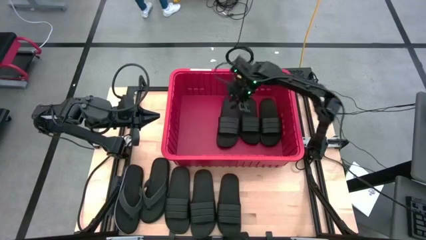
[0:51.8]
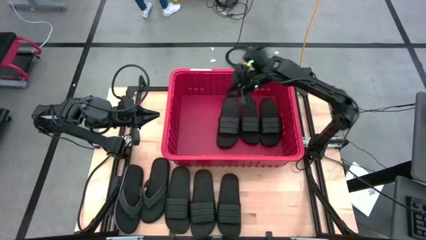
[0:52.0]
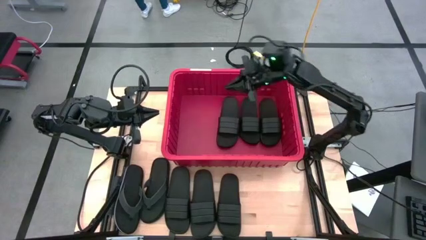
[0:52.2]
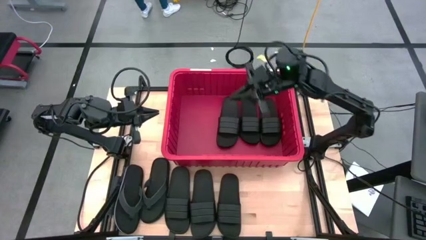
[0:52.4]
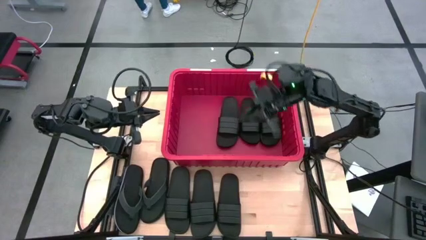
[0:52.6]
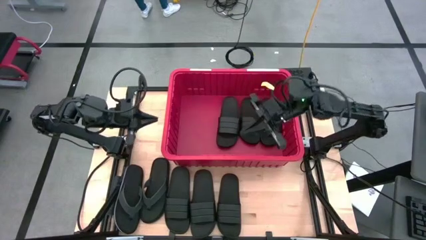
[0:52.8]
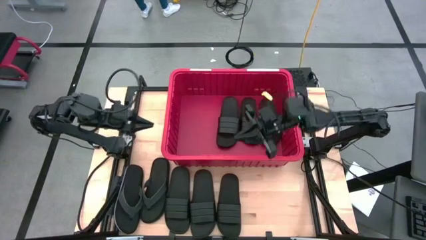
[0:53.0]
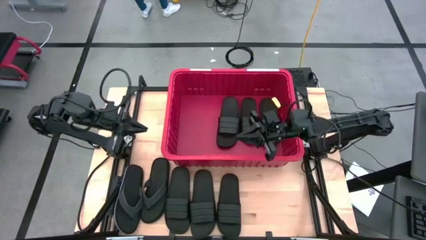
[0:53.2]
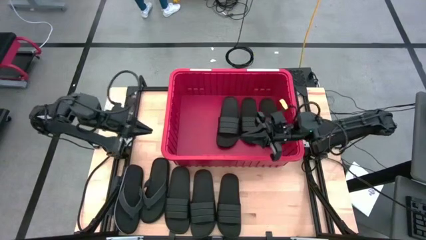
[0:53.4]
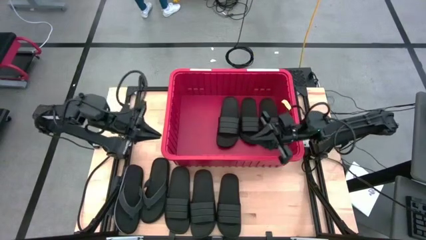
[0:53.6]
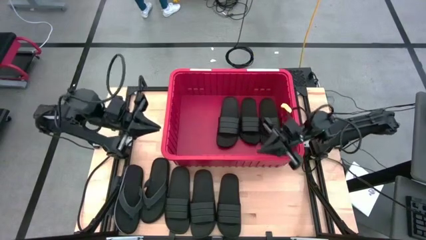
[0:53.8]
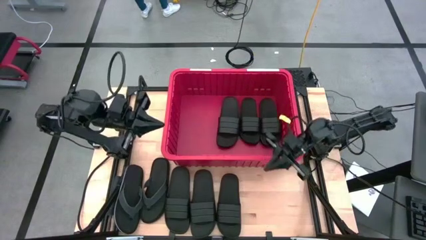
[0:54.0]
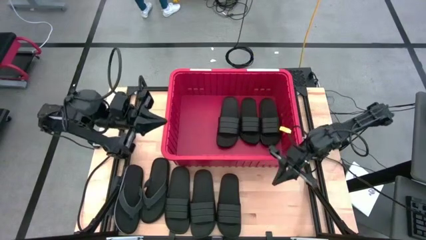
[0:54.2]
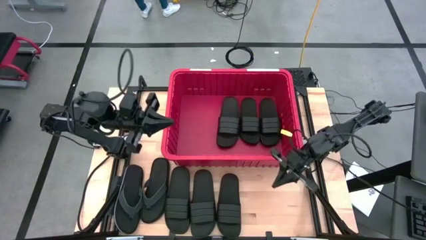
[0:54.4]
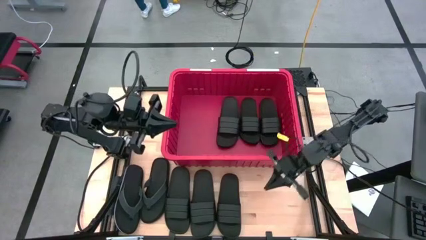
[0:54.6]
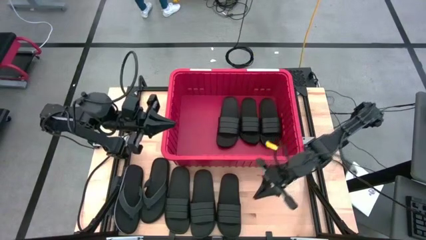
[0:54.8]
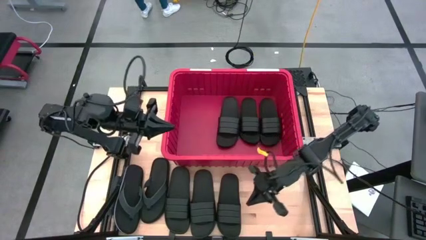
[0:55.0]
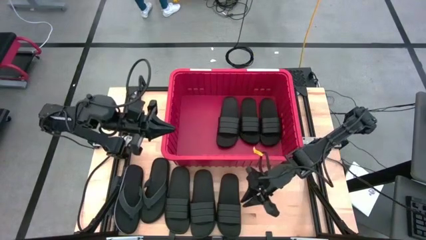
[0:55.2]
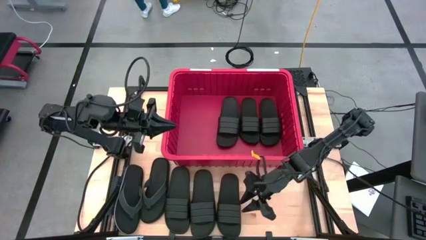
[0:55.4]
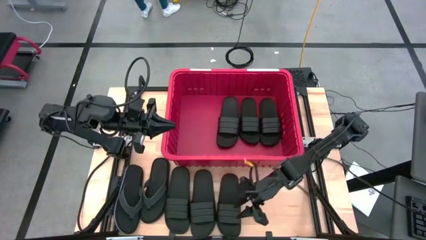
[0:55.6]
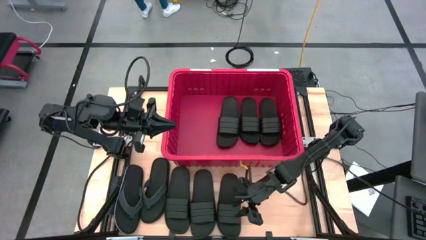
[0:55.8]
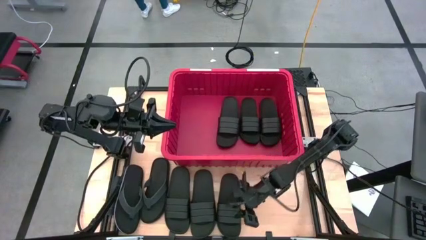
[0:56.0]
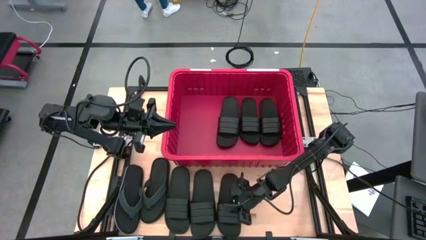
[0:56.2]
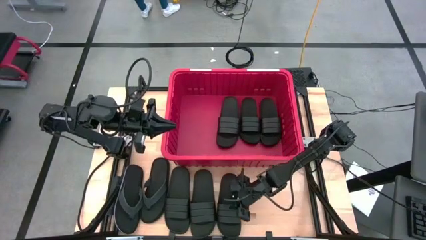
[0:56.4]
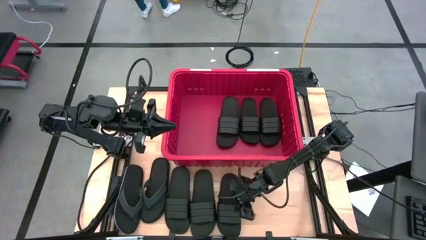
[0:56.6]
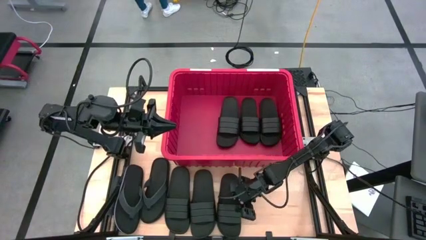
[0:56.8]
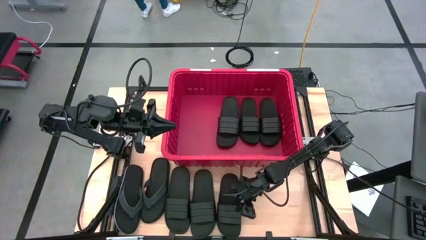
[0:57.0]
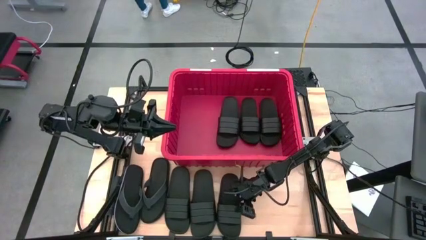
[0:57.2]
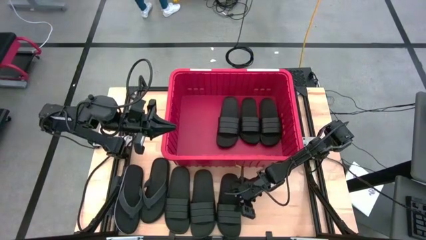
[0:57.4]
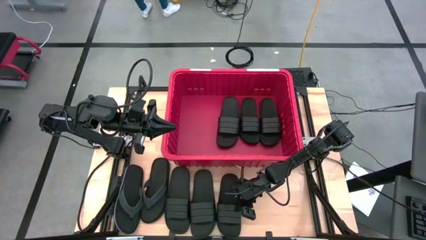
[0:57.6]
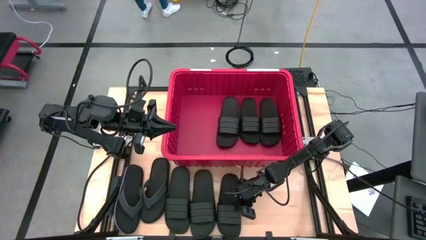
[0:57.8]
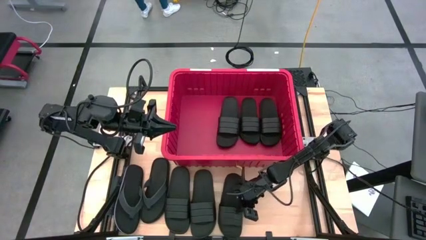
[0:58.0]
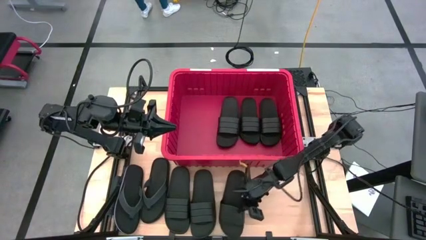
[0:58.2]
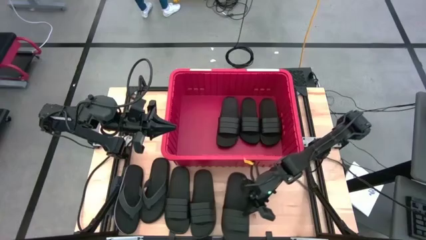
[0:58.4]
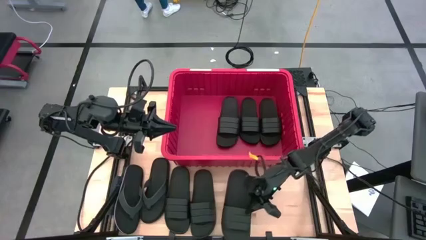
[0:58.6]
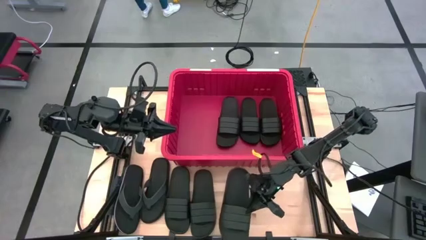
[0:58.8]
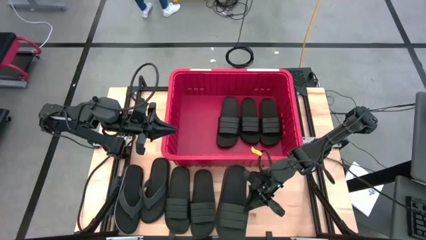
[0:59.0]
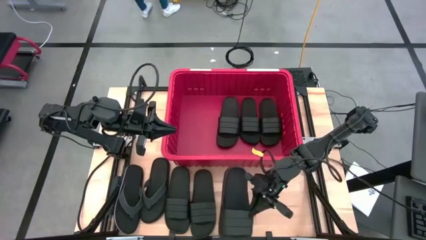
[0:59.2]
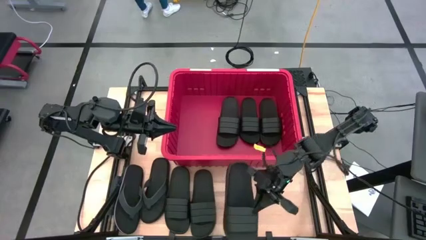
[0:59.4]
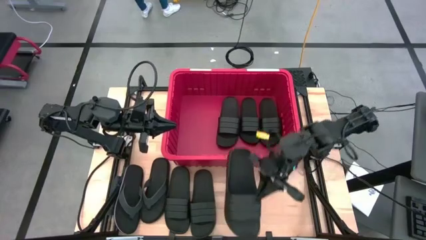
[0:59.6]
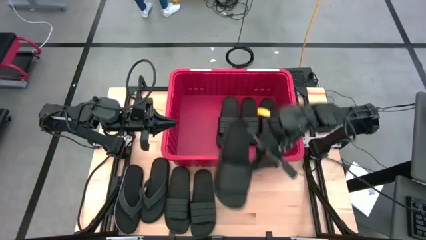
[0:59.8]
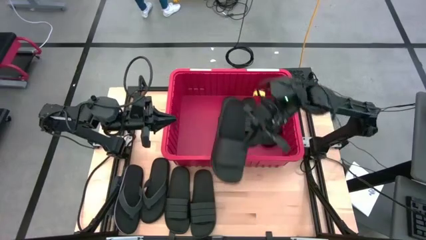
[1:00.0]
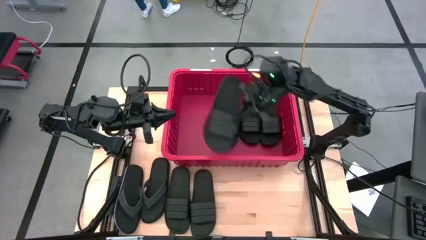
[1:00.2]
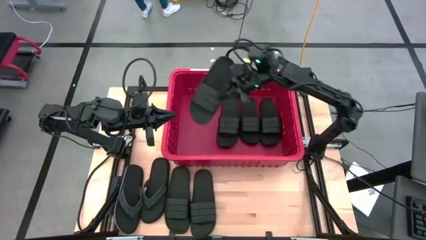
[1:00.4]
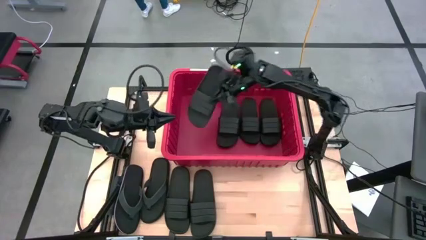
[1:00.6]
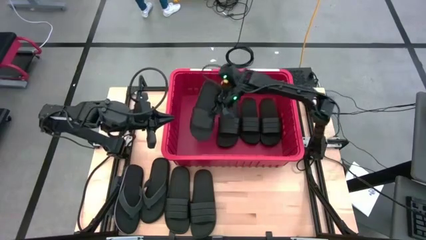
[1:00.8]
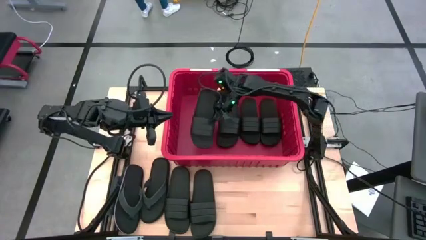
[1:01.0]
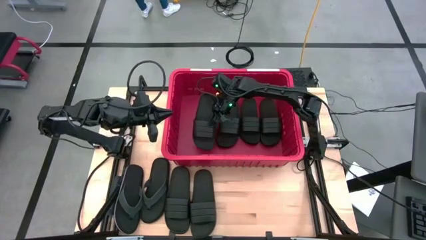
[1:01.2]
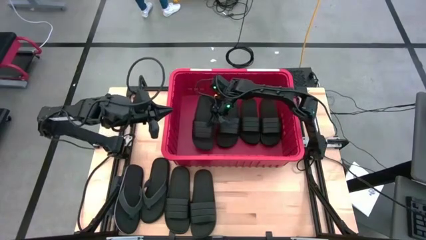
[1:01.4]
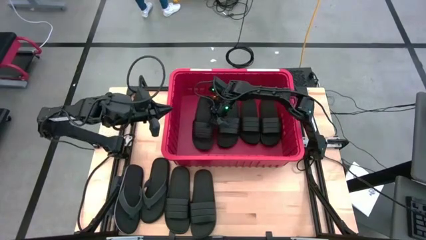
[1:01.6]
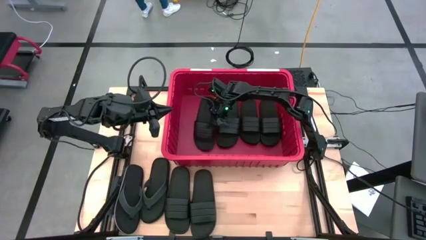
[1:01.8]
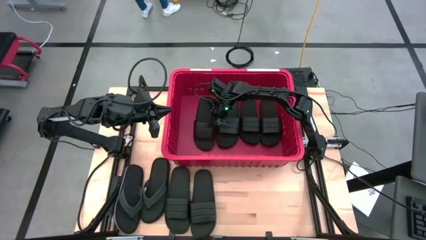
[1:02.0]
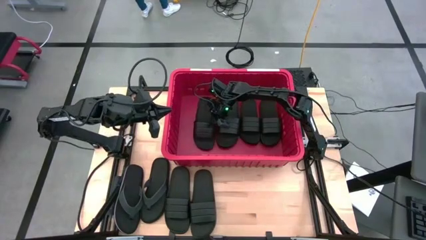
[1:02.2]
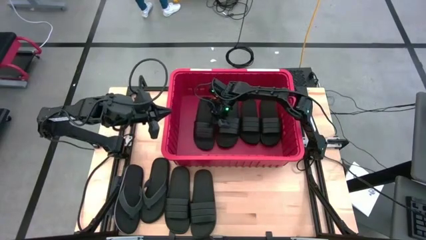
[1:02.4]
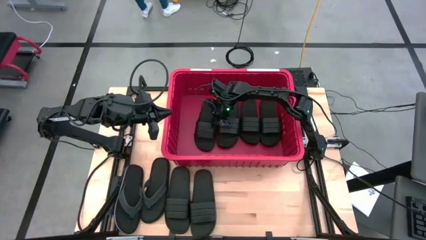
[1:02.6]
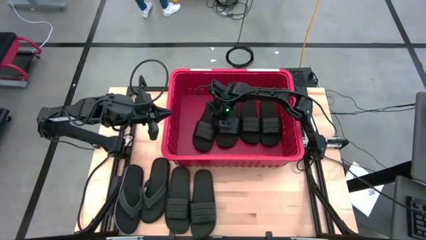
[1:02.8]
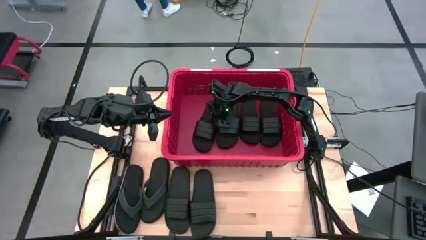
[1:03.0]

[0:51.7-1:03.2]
Task: Pick and place slides into bin
Put the black slide into the red container

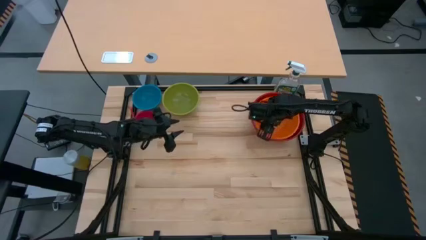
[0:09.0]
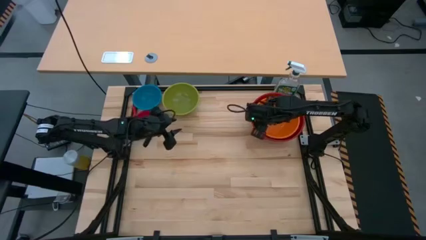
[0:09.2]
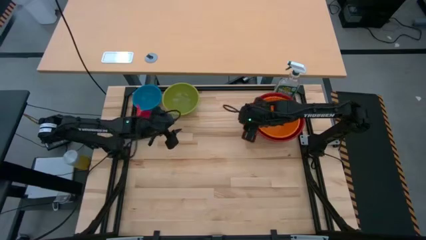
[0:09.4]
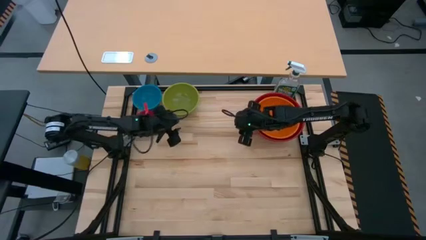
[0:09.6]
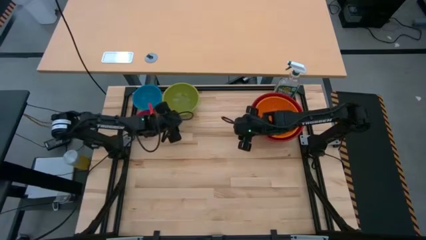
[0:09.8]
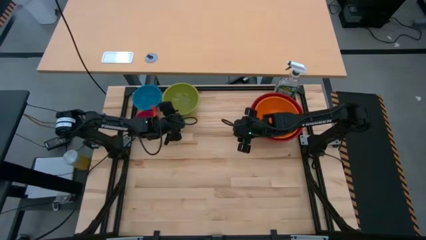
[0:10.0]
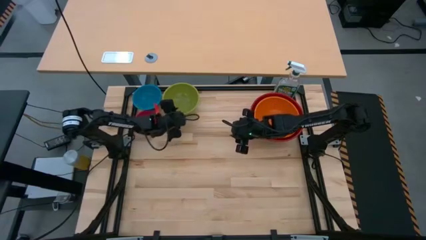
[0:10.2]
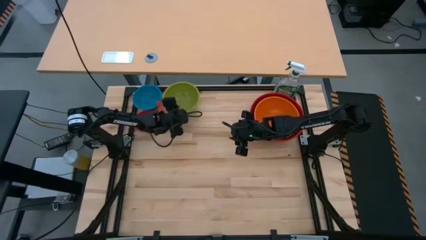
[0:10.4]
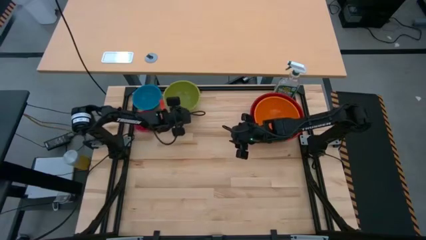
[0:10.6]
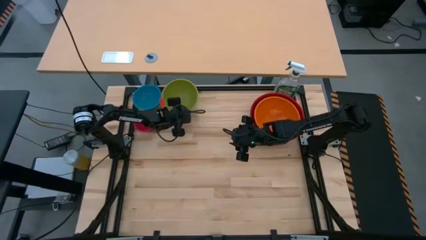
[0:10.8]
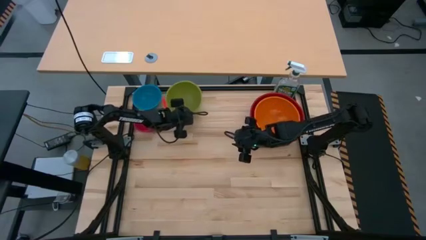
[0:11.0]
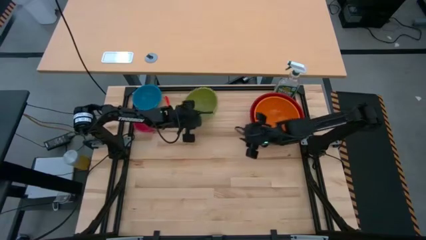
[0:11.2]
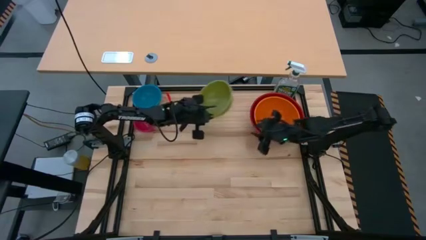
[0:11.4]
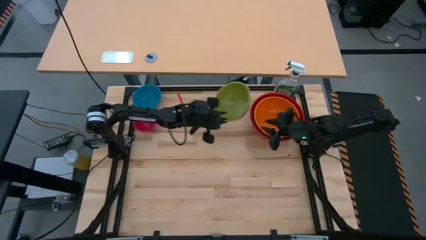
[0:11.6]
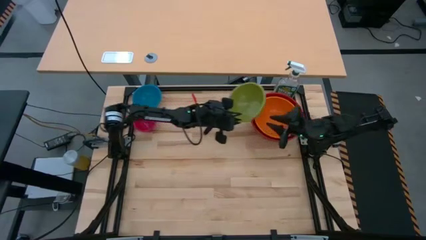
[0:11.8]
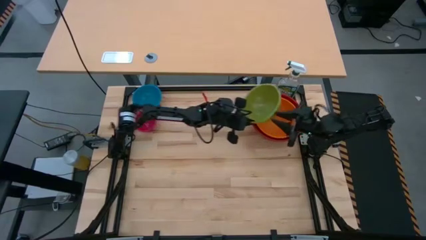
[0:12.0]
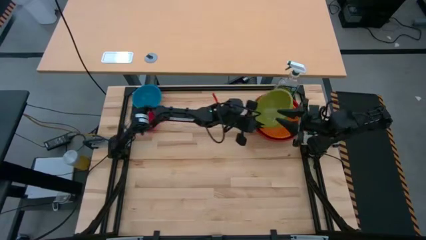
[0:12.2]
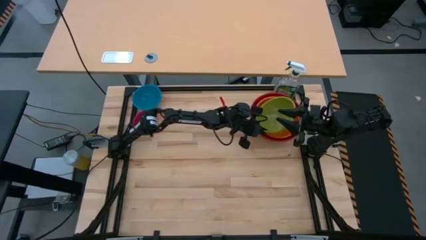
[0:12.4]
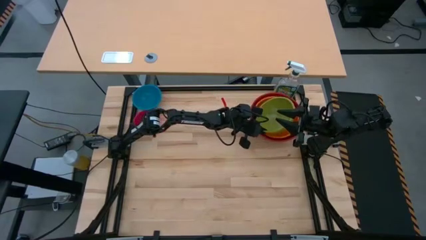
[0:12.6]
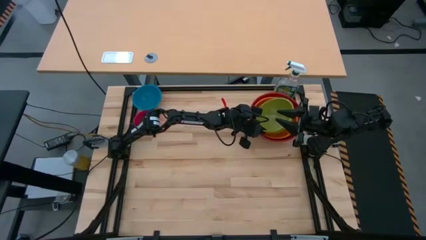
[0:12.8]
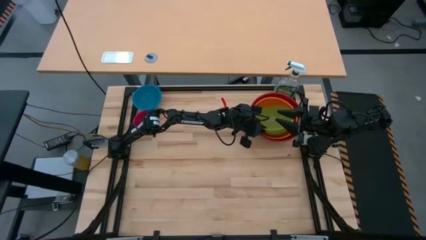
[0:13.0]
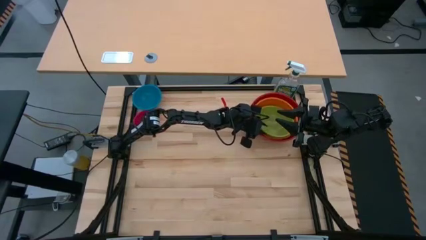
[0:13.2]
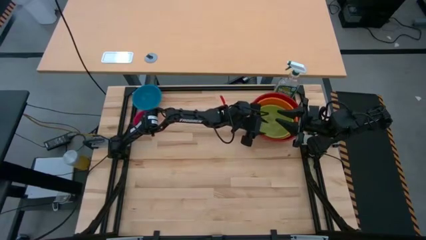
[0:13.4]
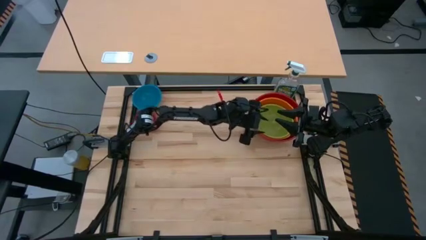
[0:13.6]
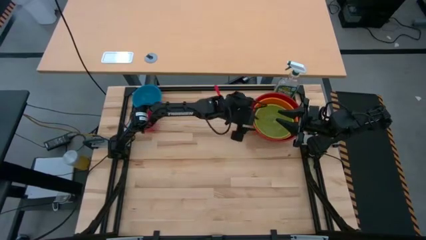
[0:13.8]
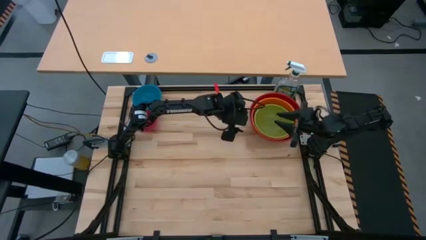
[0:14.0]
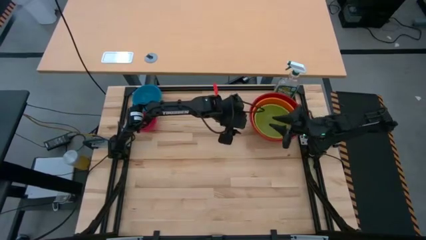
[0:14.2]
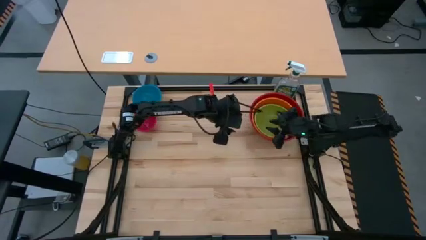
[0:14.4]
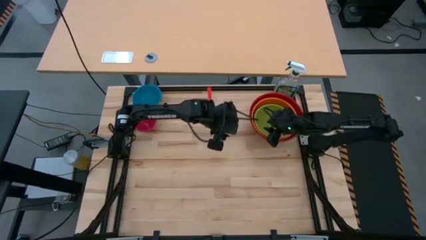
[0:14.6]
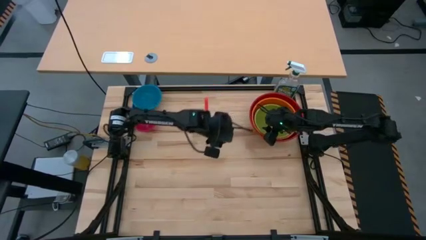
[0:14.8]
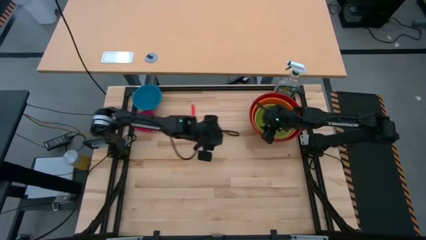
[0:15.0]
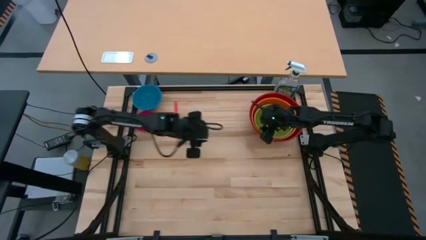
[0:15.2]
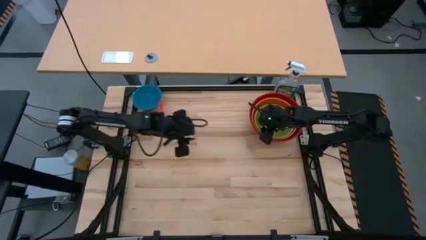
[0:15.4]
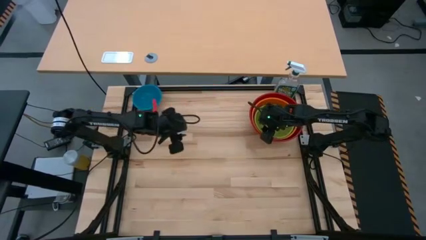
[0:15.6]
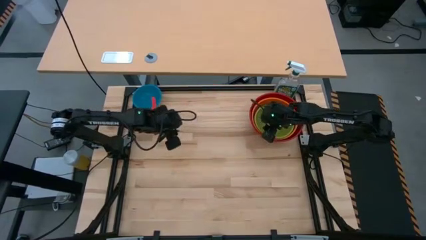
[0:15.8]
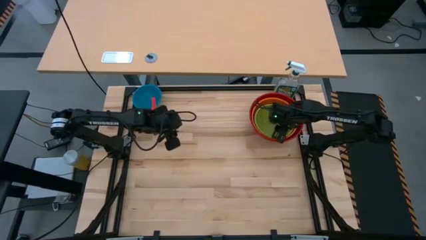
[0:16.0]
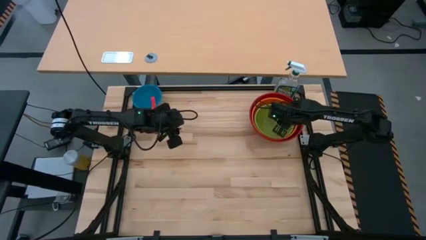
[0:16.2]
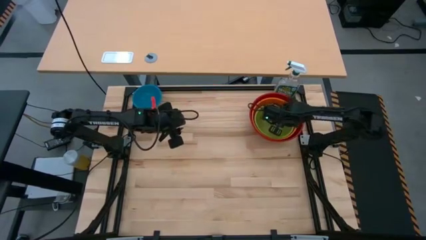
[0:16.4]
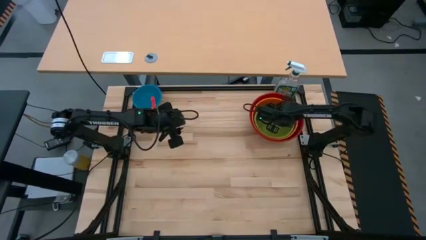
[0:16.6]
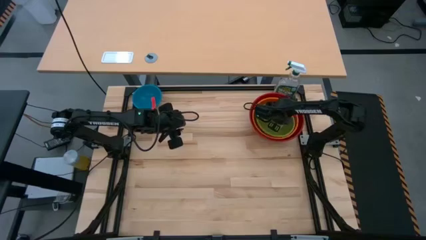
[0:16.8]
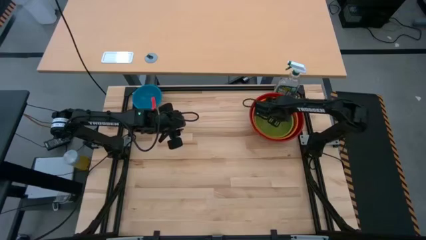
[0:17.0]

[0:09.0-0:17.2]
Task: Nest bowls inside each other by size order
Stack the green bowl on top of the orange bowl
